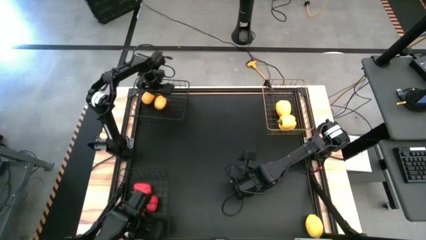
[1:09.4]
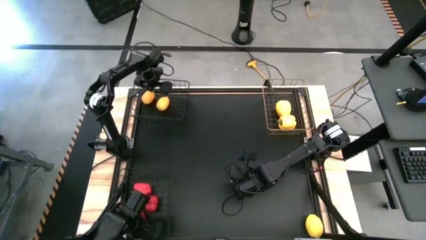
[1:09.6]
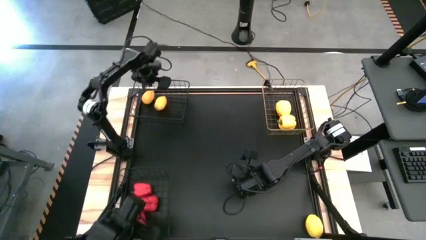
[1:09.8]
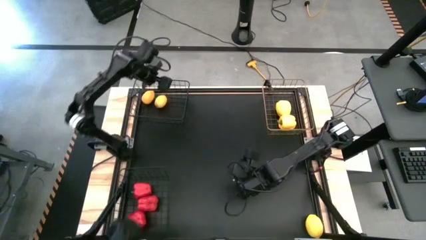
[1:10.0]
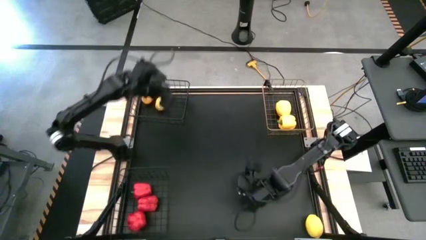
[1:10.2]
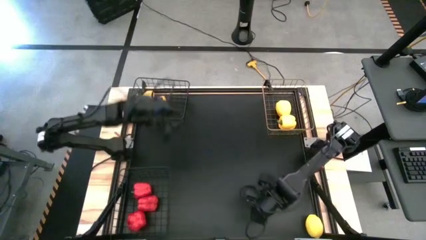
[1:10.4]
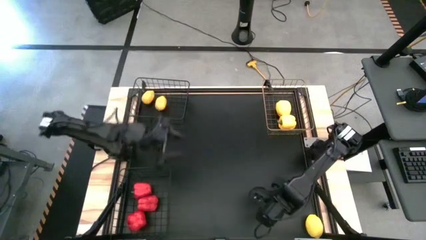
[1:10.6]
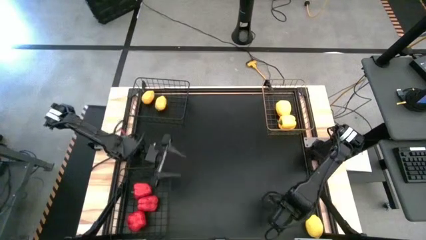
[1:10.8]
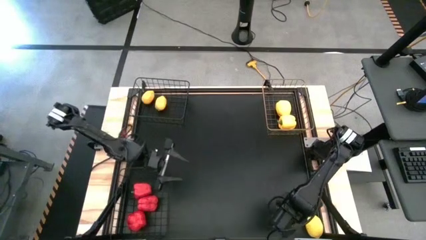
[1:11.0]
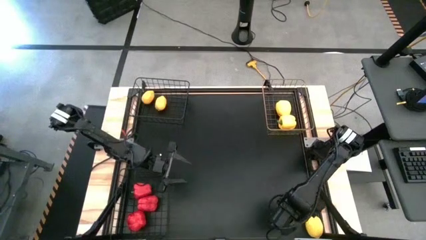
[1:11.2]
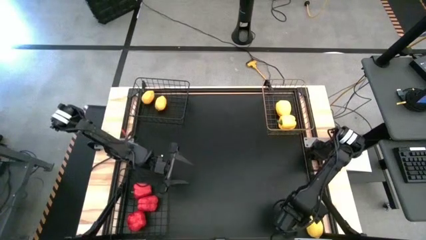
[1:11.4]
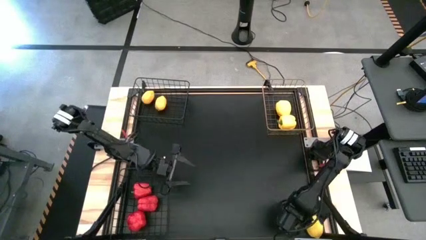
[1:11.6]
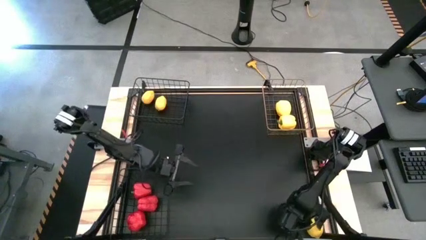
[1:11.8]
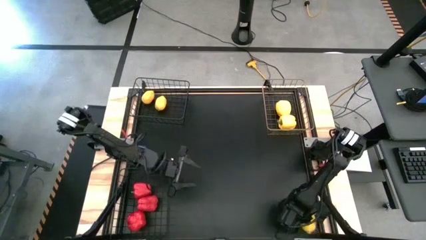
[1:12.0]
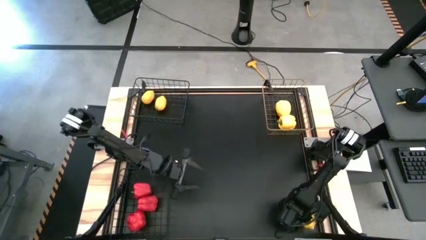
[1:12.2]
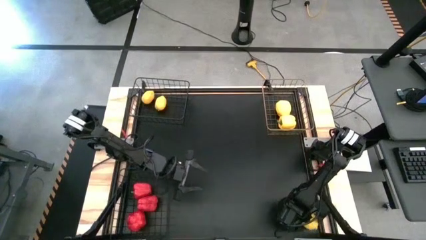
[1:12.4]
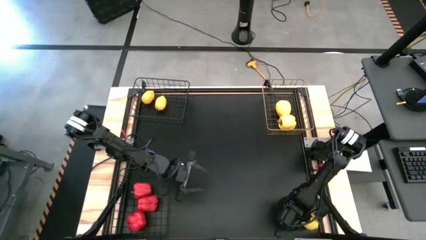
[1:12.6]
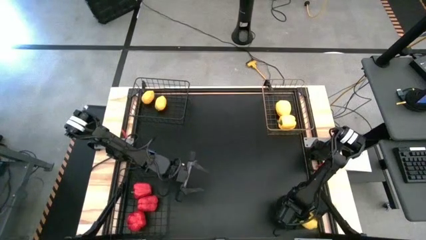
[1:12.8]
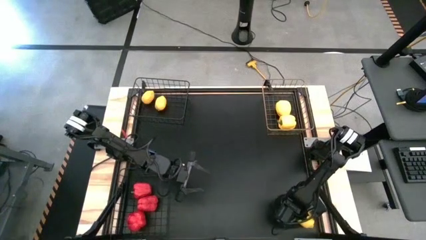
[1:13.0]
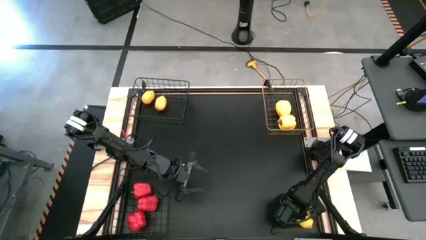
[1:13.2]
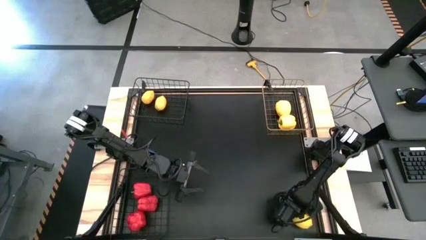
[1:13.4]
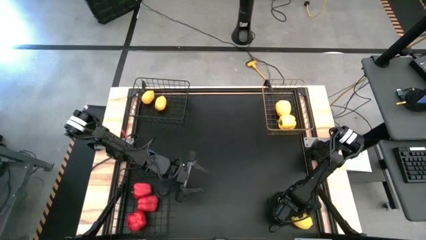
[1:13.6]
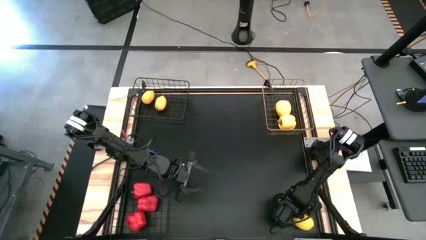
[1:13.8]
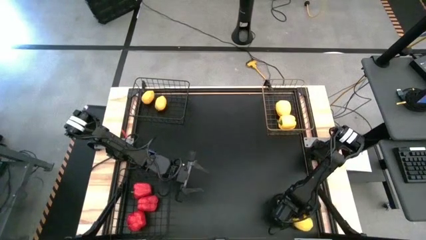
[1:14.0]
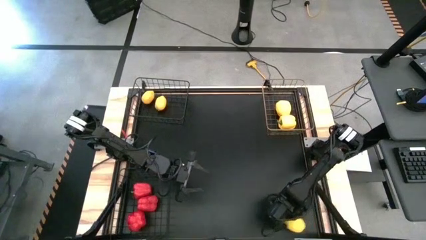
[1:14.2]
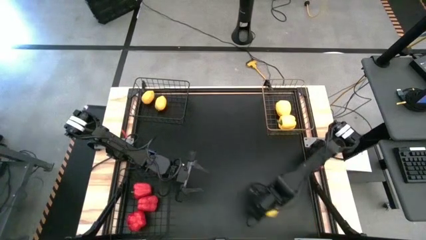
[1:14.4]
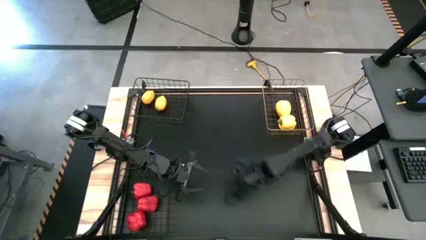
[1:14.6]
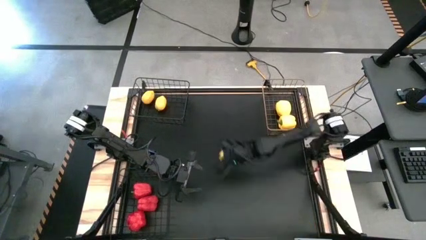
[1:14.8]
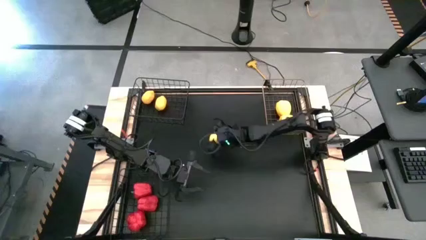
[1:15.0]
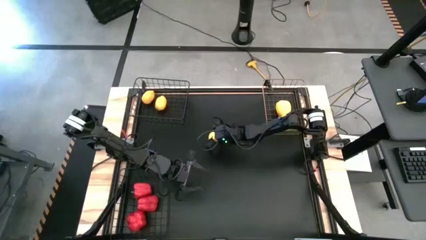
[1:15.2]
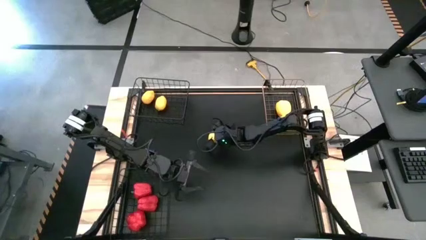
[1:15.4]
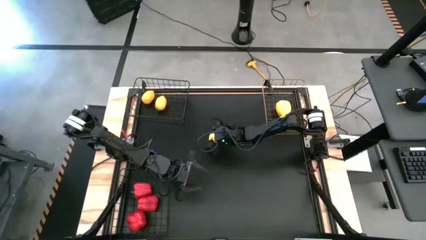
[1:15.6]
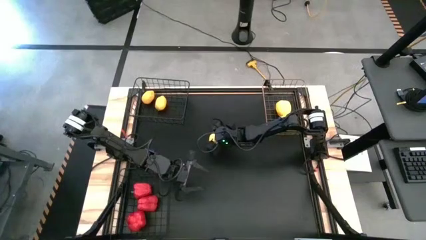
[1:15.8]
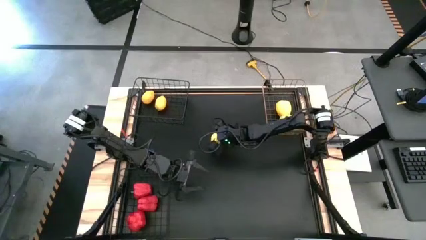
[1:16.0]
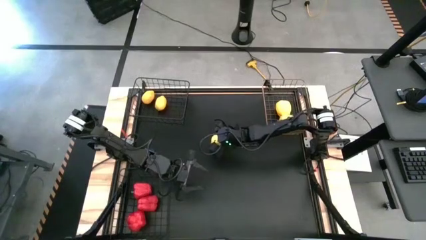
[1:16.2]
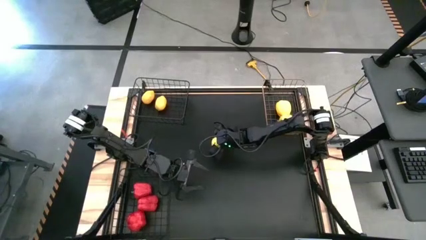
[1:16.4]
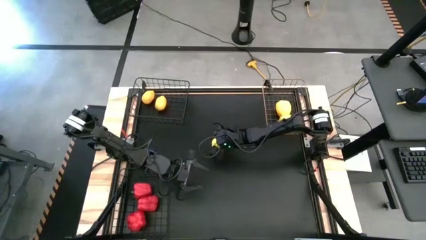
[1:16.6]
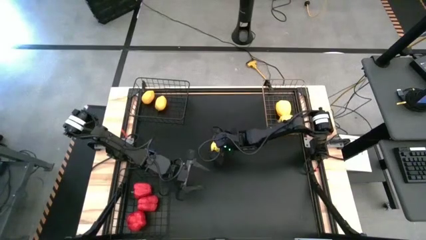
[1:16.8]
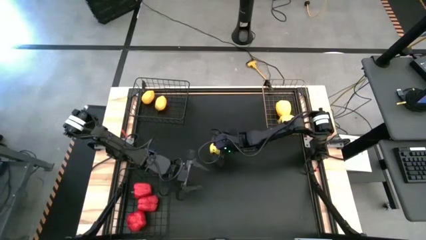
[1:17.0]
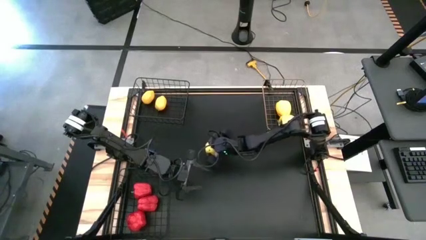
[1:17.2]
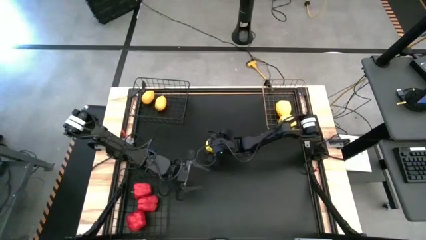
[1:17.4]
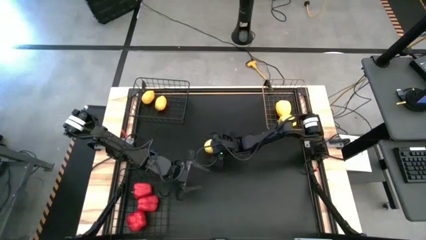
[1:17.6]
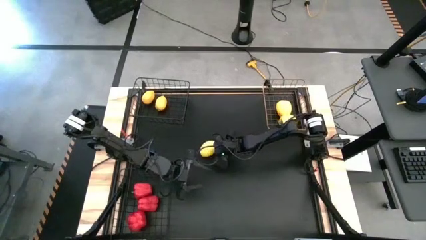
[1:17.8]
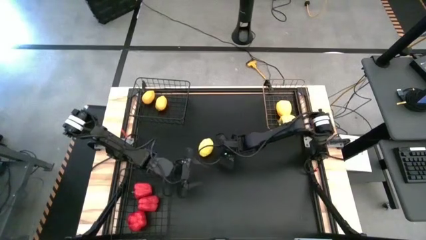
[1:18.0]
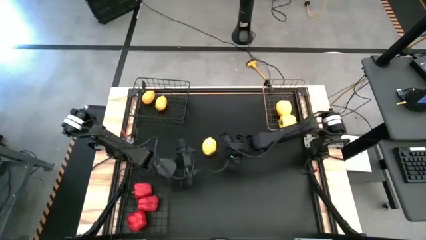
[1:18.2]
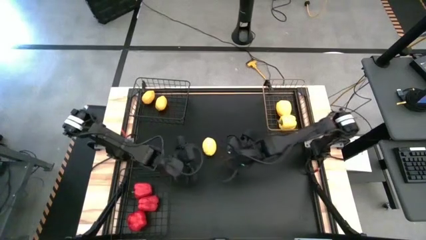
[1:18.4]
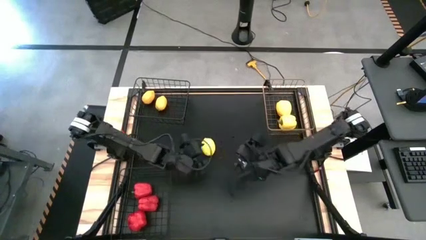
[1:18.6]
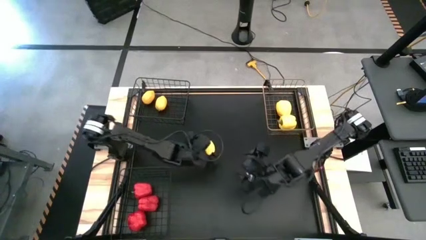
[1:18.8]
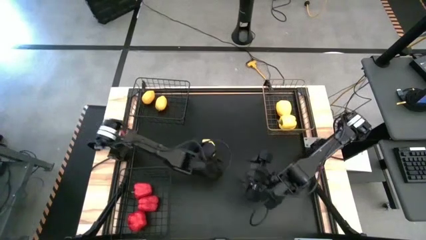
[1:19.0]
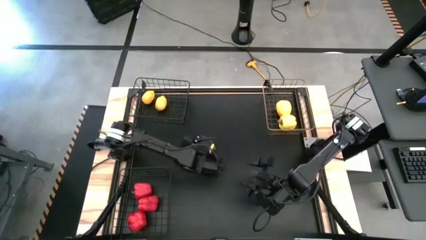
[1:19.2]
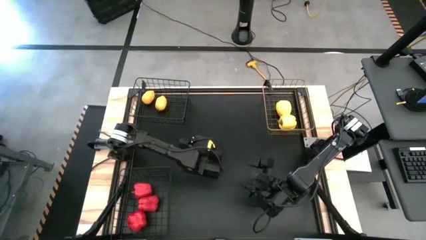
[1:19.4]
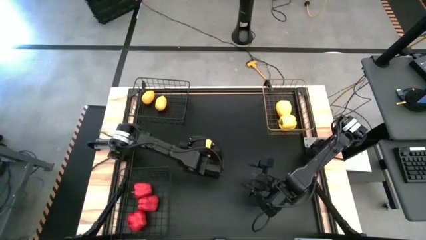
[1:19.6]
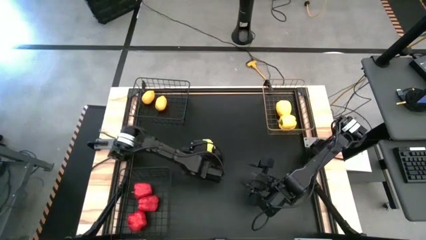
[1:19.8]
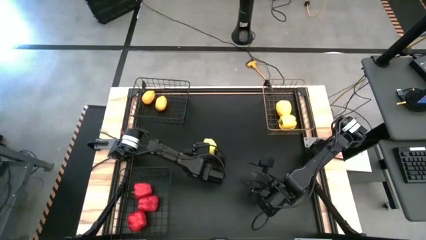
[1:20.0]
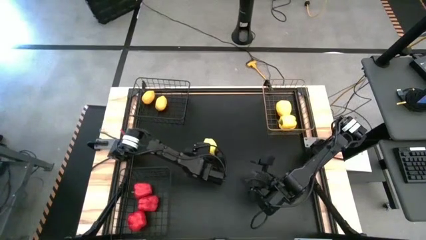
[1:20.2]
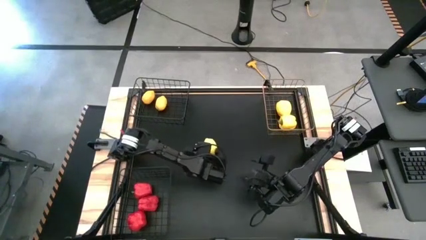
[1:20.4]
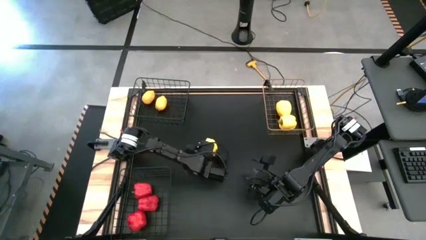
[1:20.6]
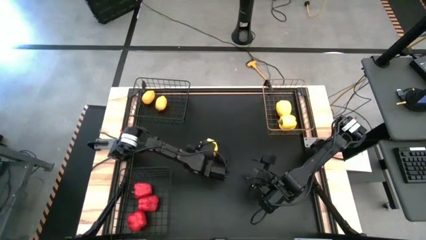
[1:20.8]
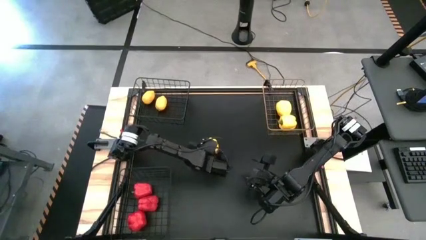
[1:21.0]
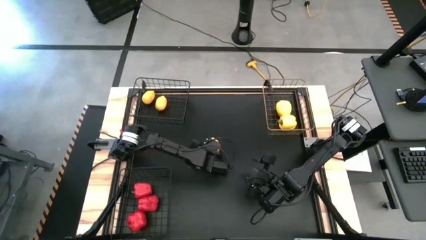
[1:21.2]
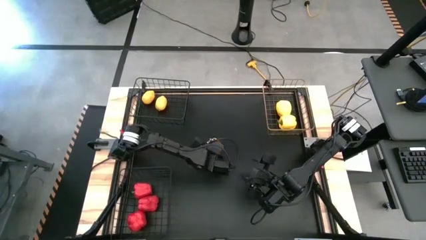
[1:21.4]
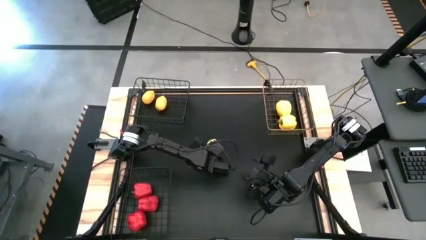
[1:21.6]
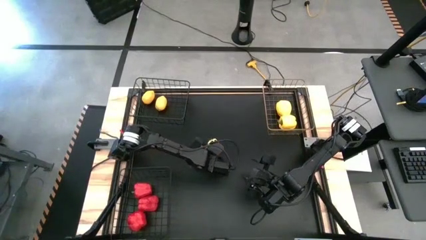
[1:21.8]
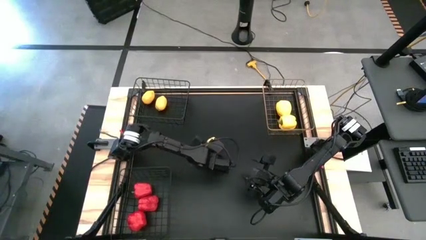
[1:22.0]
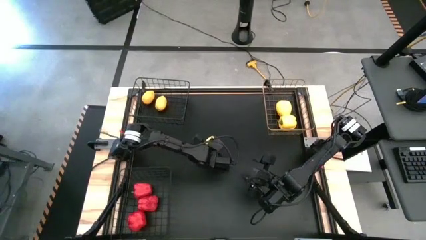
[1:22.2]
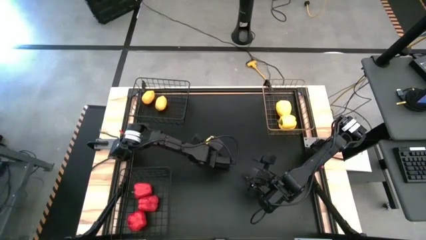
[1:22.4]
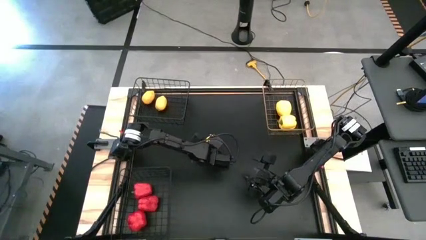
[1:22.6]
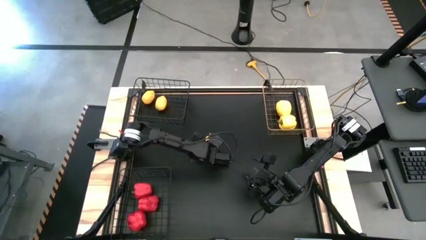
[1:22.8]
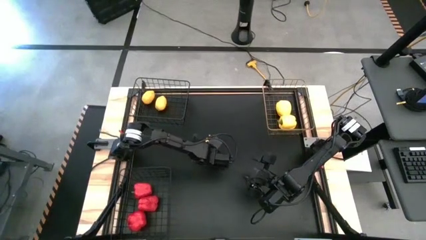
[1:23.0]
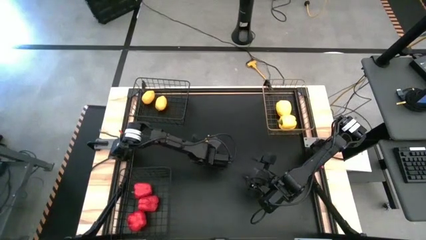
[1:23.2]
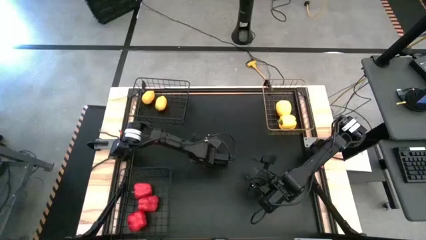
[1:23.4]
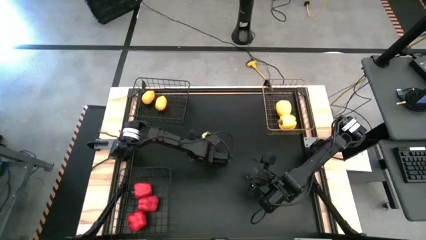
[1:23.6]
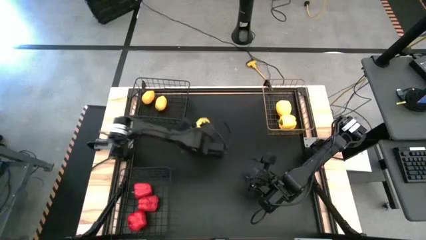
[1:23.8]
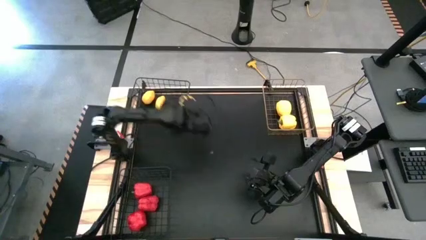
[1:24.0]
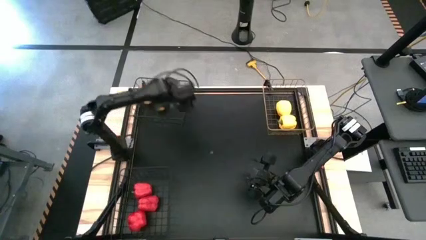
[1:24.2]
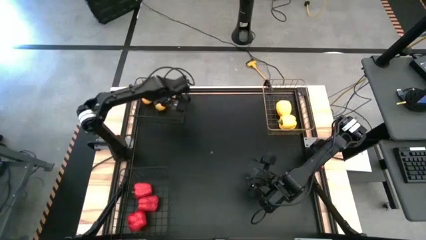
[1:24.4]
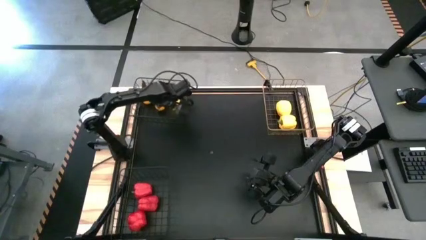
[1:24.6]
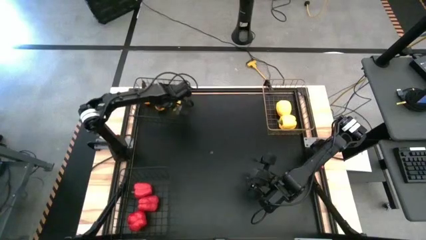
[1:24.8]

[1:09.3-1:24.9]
Task: Sort produce into baskets
Put the yellow lemon into the top black wire basket
